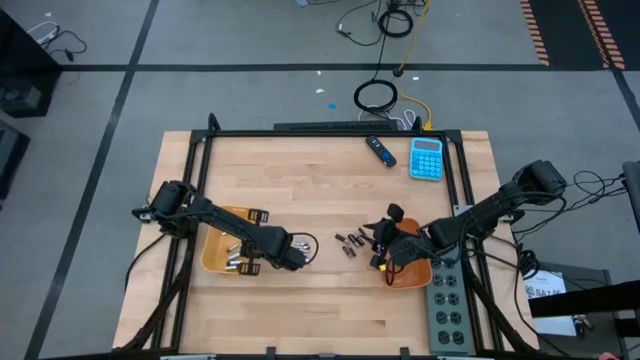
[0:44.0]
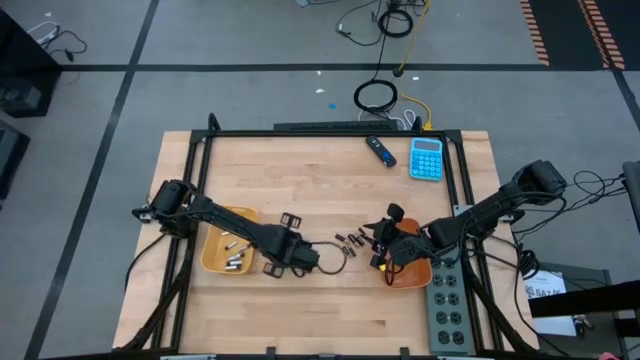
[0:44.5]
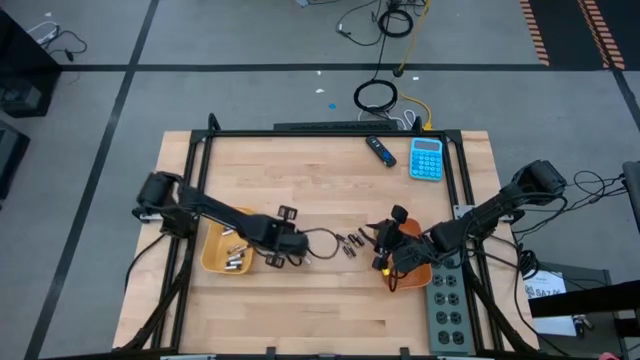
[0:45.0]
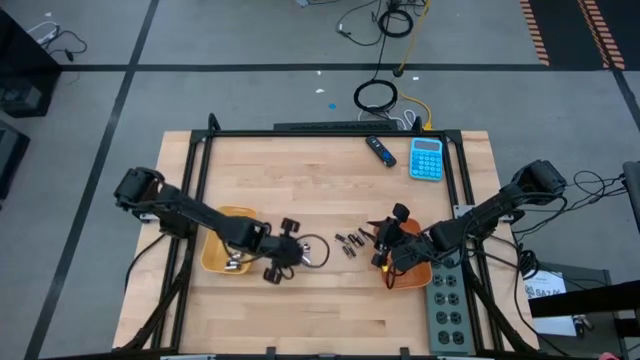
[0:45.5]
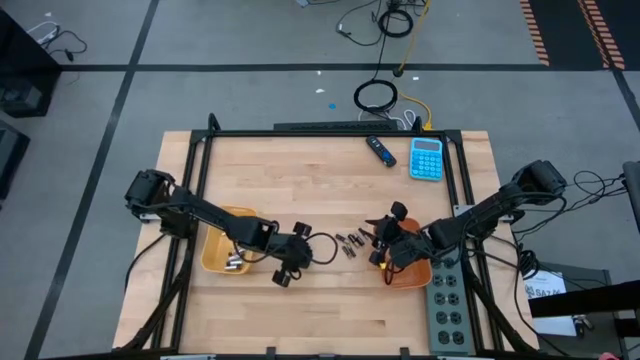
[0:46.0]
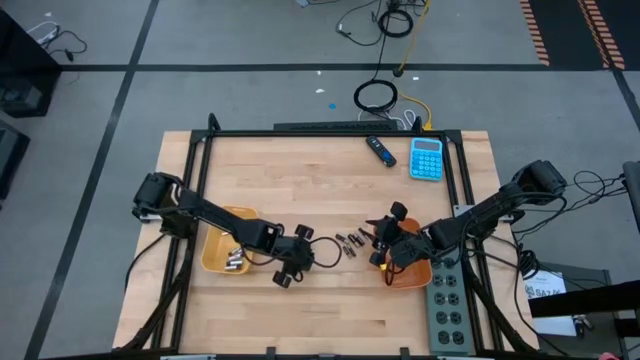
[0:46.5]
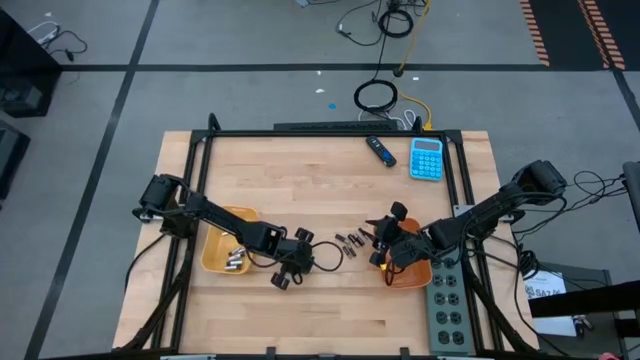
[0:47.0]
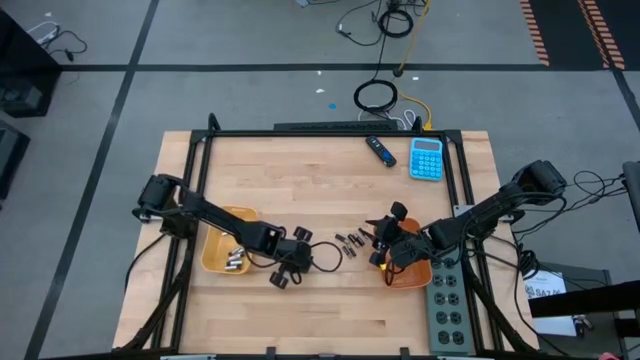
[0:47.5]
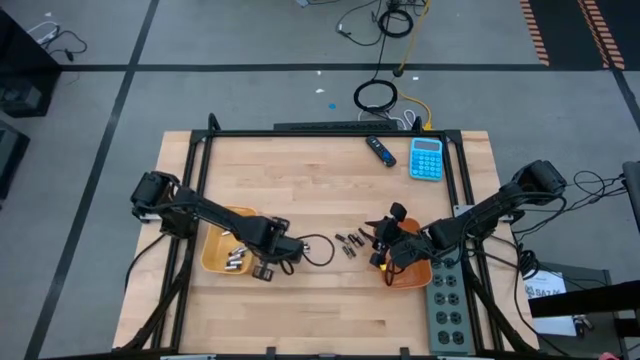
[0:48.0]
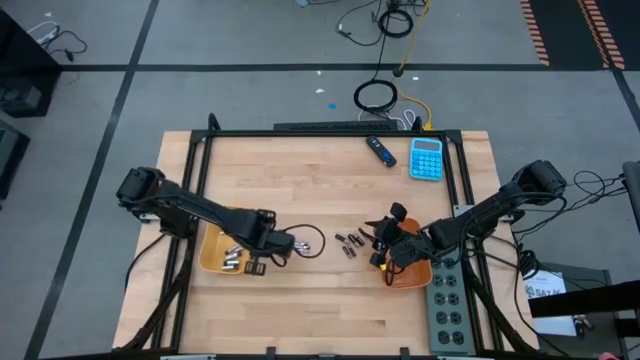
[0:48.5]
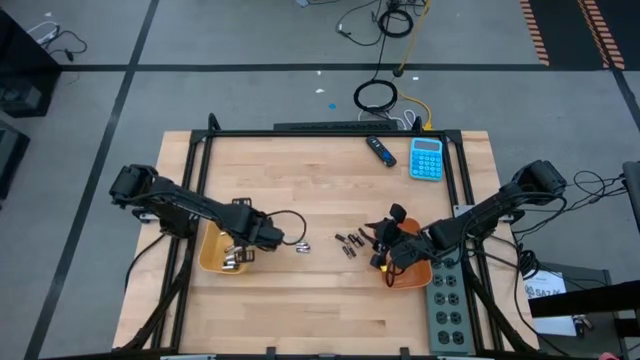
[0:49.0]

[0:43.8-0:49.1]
Task: Sort batteries
Put the white battery into the yellow bin

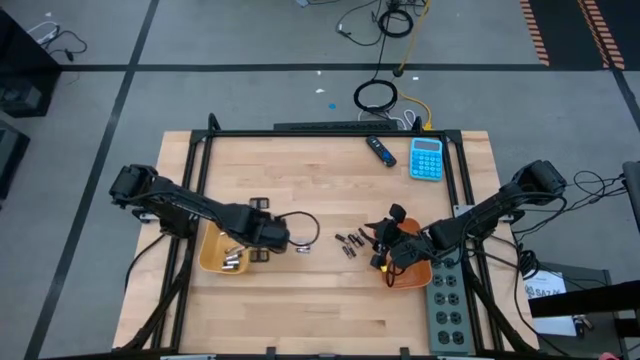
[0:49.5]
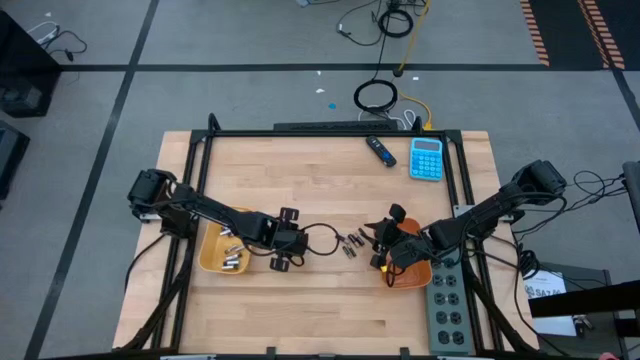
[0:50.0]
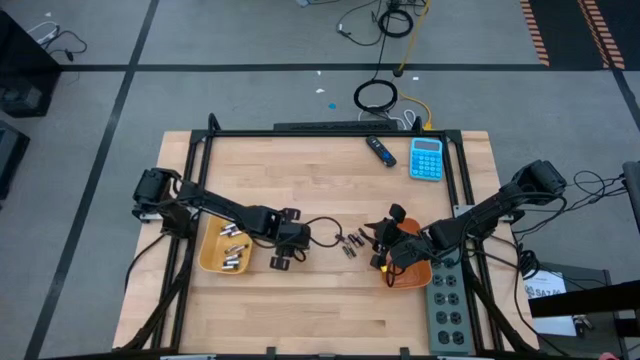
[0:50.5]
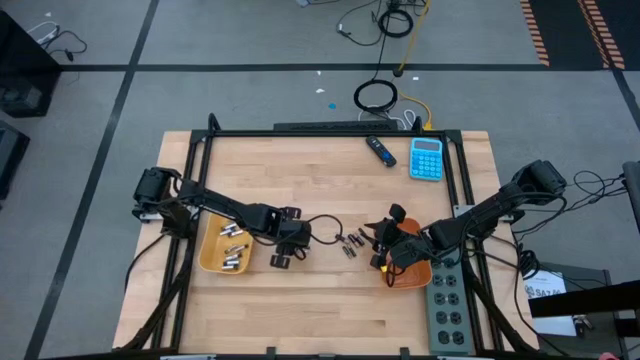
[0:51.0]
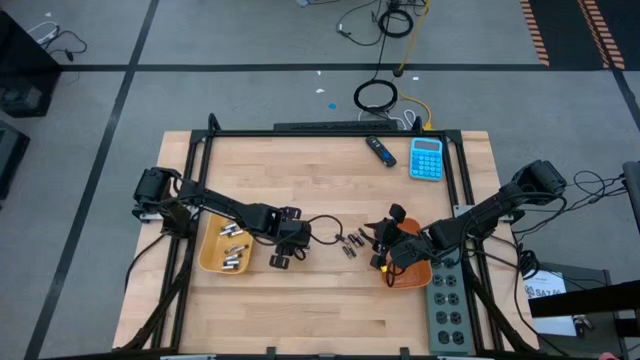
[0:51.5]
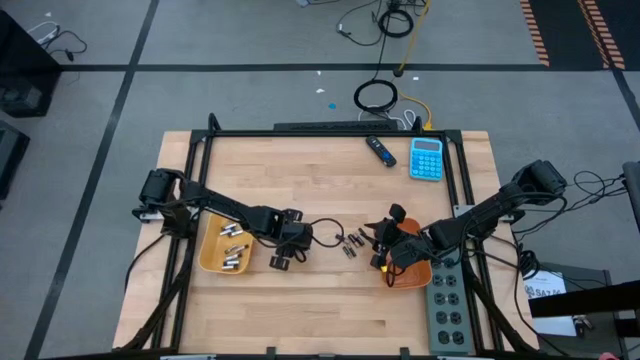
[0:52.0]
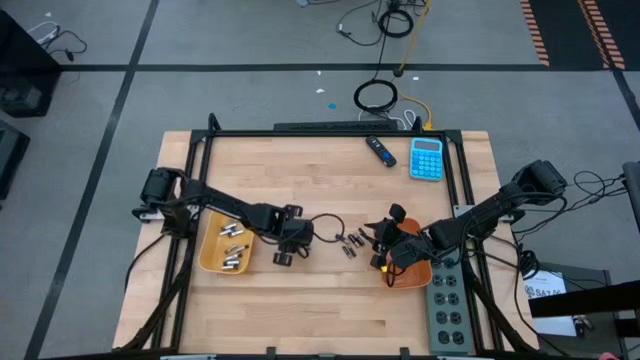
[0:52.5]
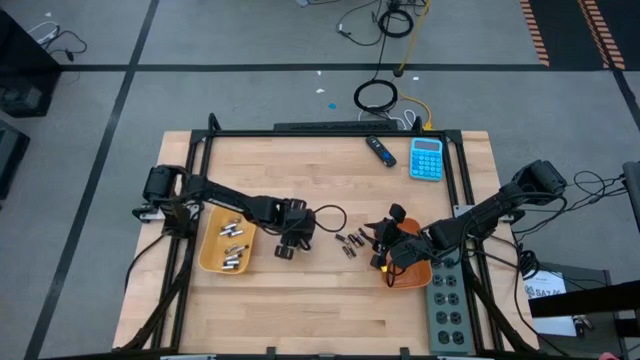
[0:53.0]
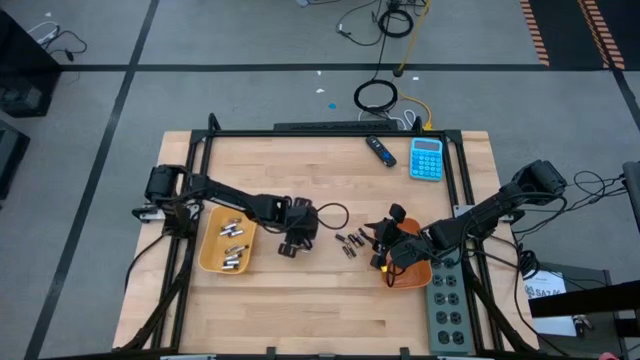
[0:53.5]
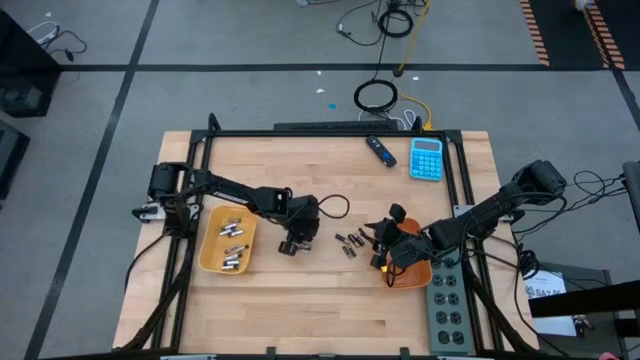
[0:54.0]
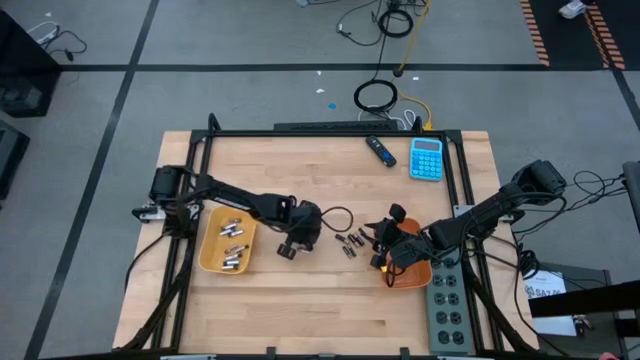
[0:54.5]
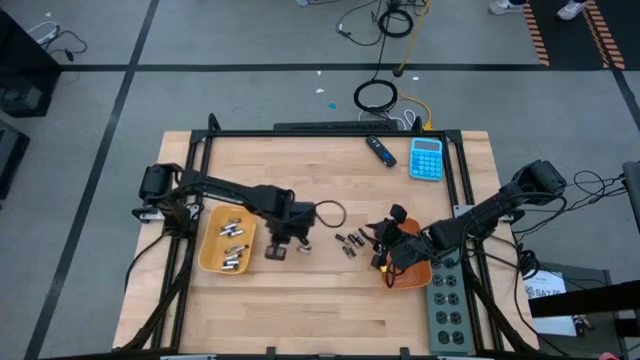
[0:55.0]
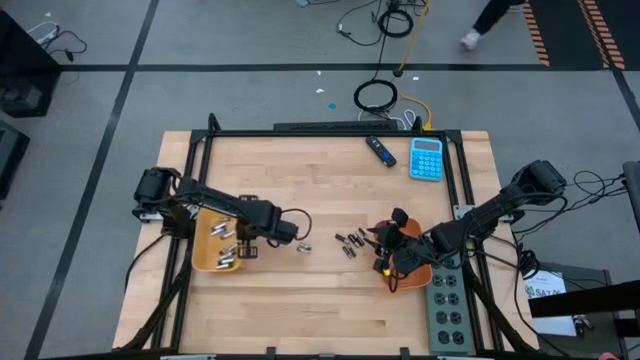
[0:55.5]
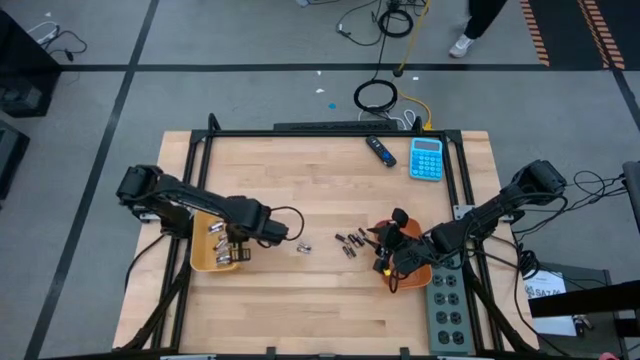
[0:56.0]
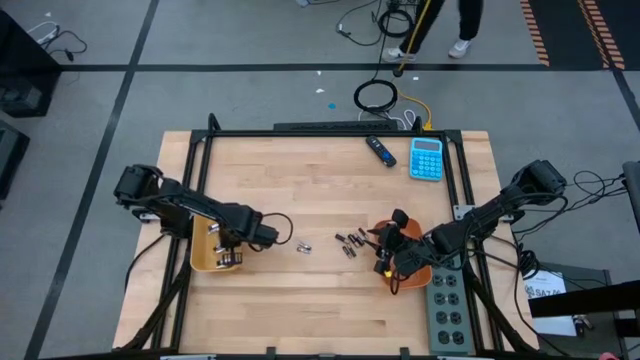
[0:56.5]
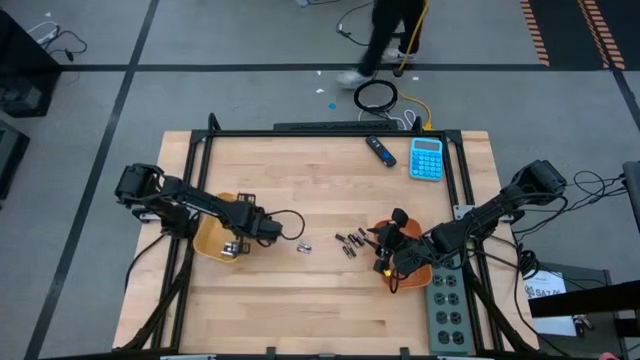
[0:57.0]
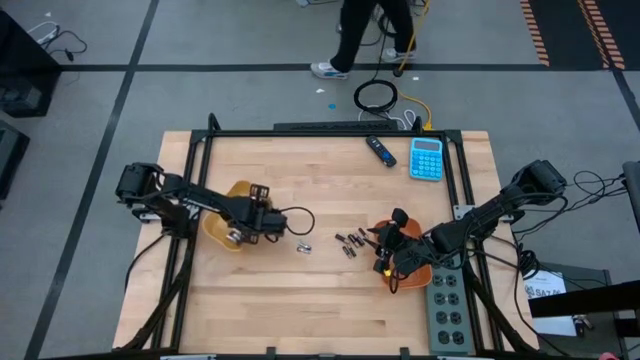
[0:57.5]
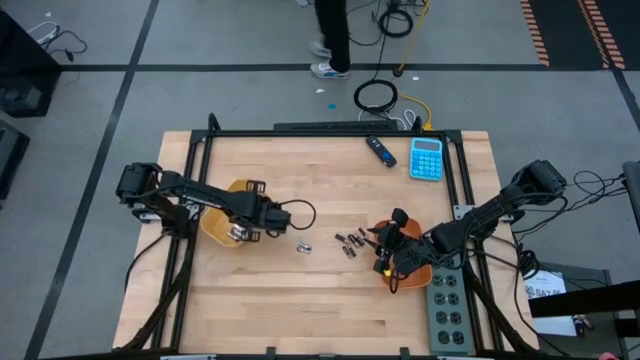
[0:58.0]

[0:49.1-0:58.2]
Put the white battery into the yellow bin

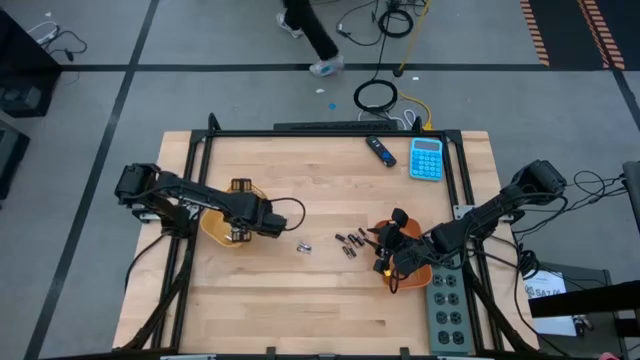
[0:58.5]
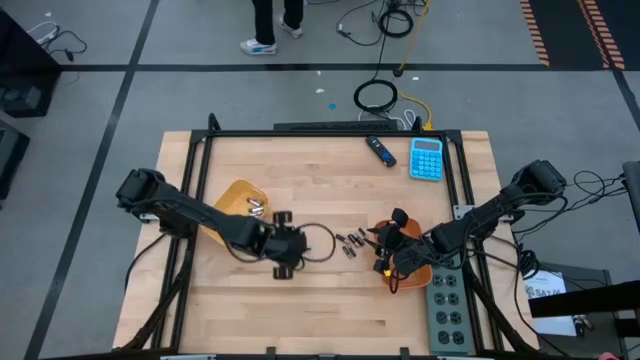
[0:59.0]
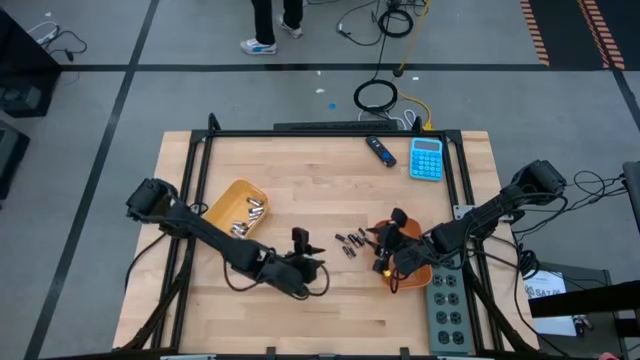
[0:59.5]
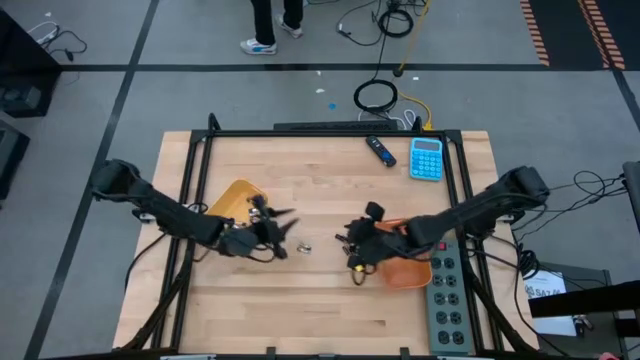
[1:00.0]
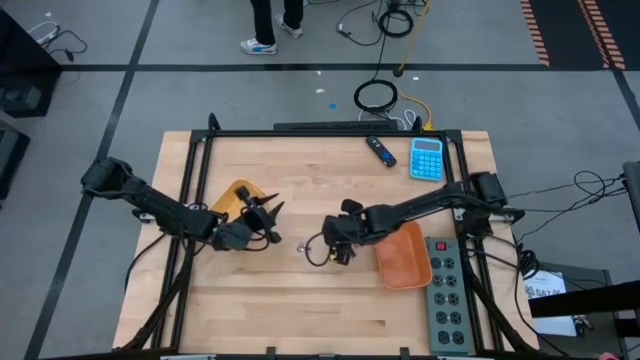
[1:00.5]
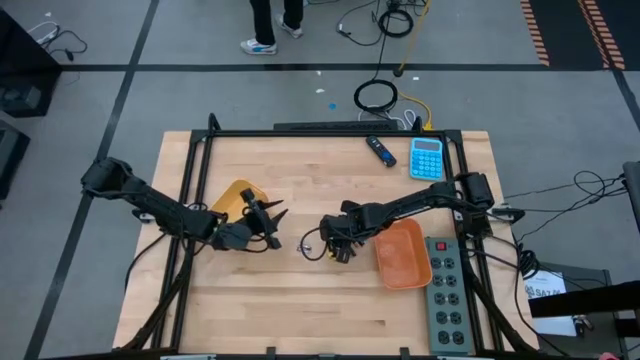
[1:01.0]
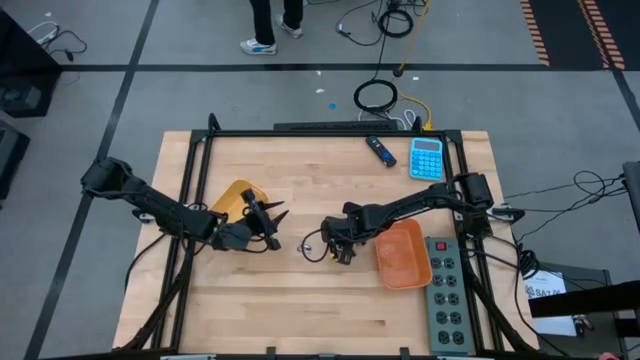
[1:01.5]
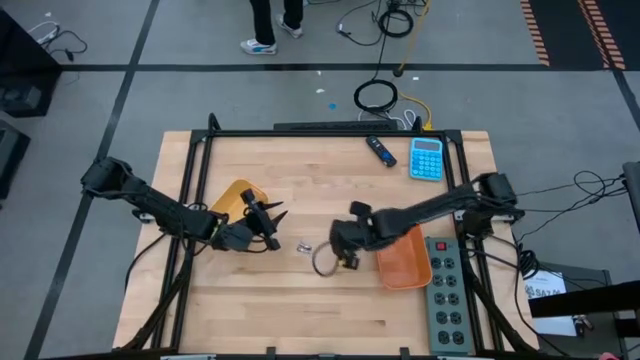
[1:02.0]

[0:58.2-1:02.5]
Put the black battery into the orange bin

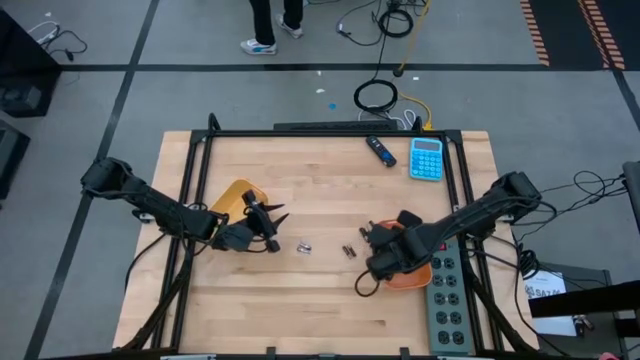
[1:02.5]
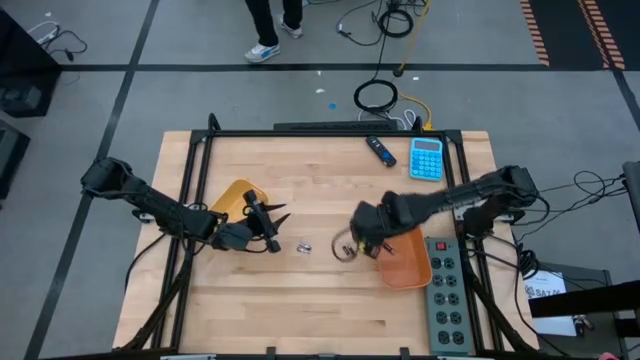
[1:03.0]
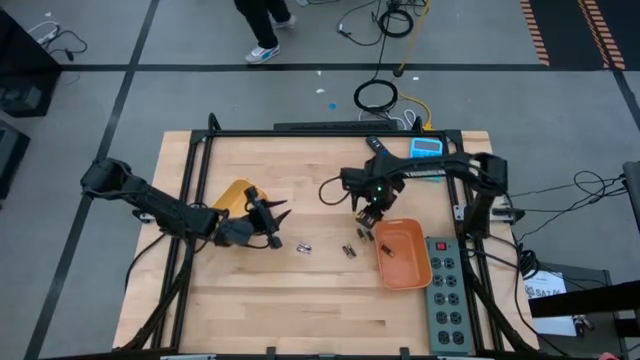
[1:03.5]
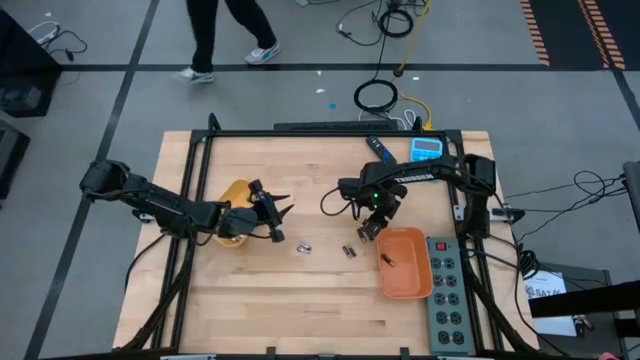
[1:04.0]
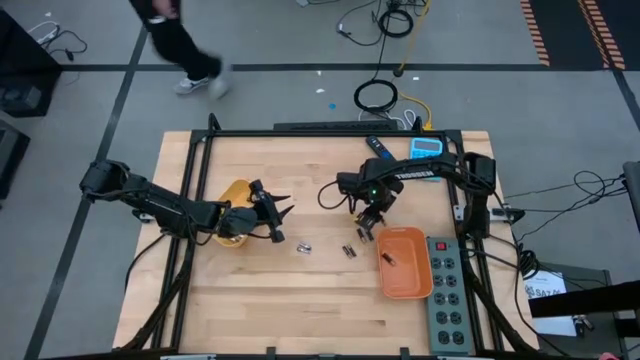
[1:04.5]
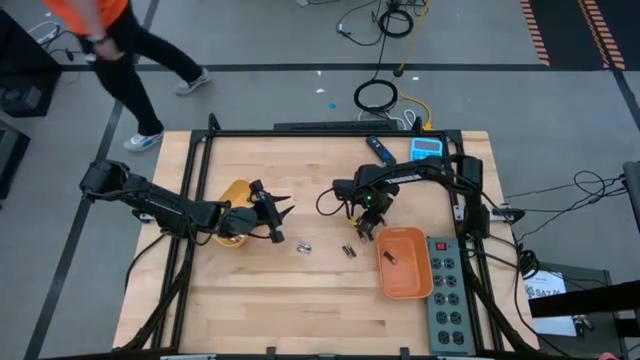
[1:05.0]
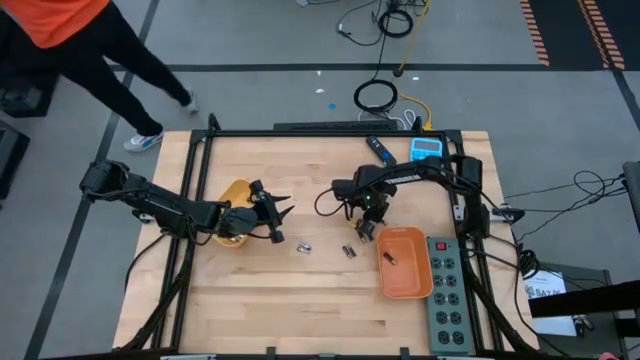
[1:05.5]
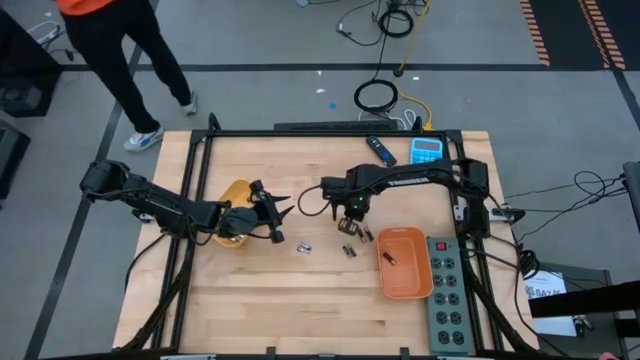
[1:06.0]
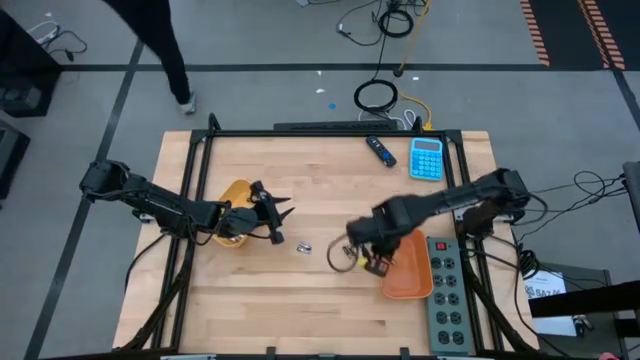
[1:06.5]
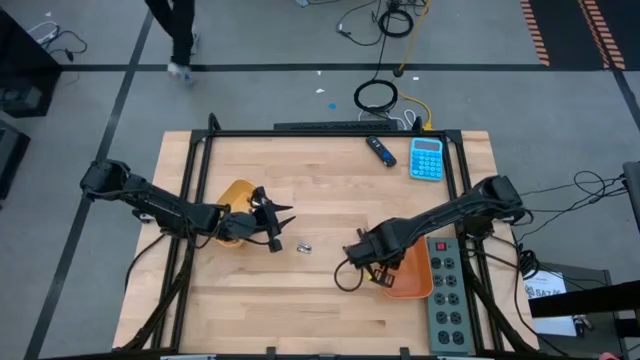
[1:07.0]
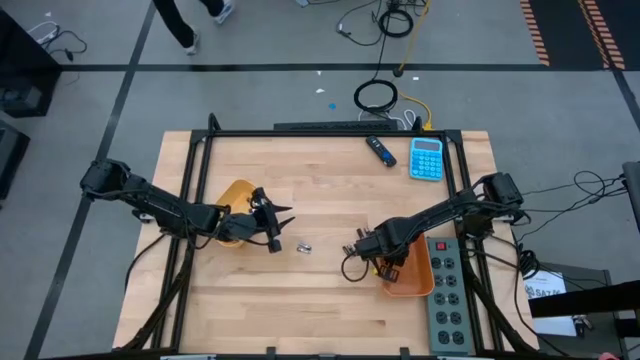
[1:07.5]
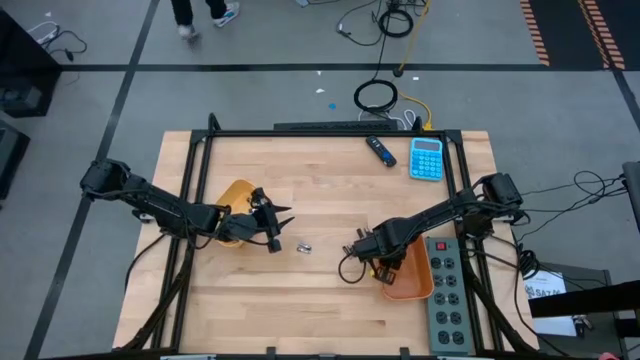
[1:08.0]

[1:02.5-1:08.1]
Put the black battery into the orange bin
